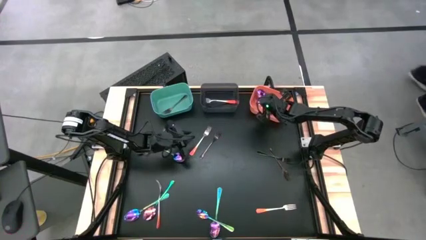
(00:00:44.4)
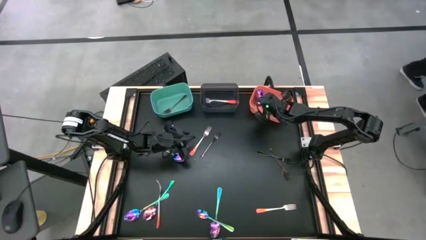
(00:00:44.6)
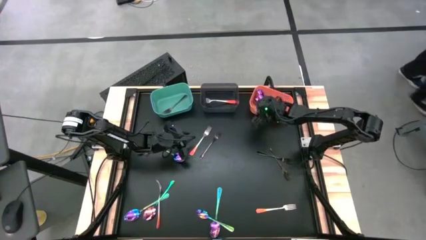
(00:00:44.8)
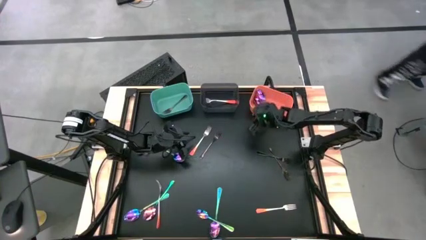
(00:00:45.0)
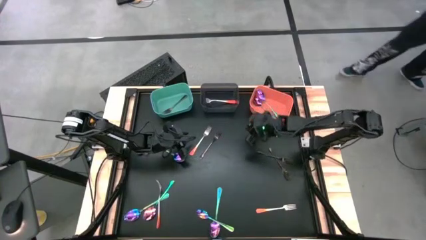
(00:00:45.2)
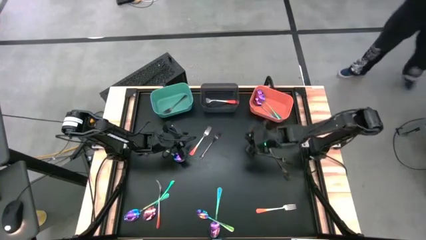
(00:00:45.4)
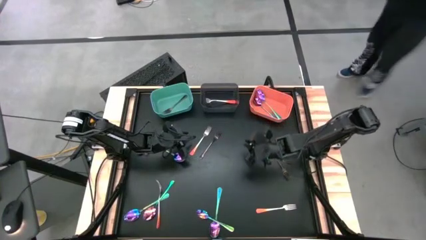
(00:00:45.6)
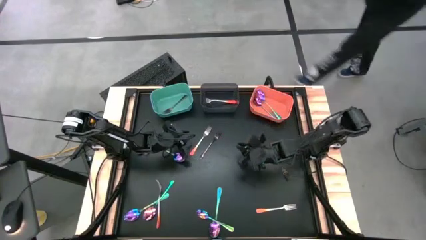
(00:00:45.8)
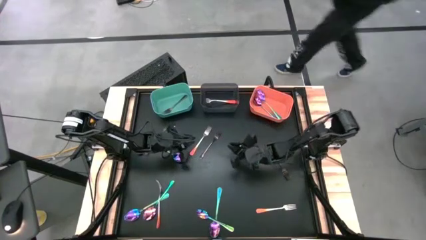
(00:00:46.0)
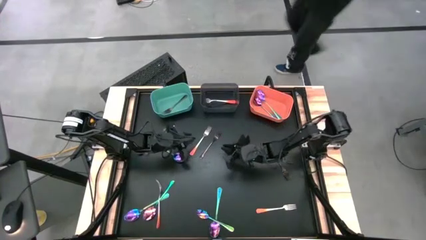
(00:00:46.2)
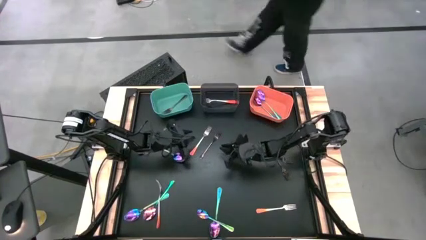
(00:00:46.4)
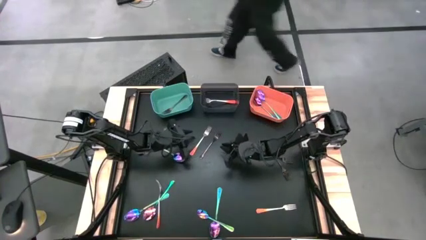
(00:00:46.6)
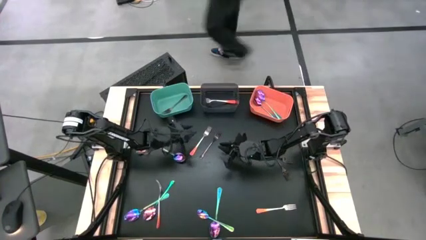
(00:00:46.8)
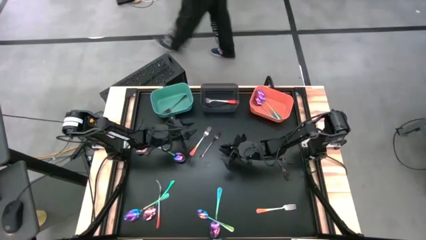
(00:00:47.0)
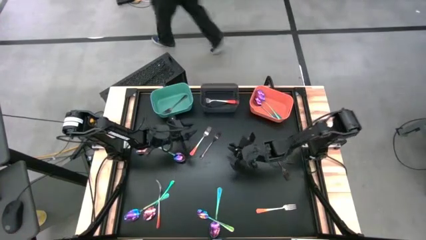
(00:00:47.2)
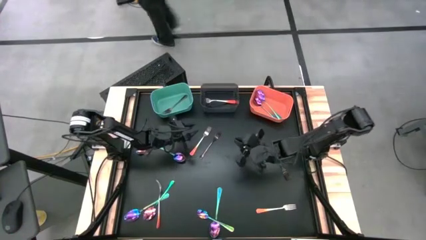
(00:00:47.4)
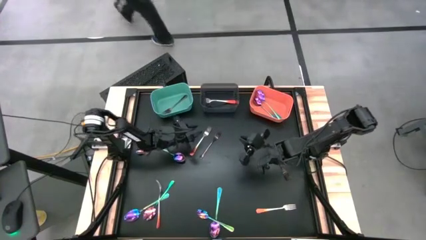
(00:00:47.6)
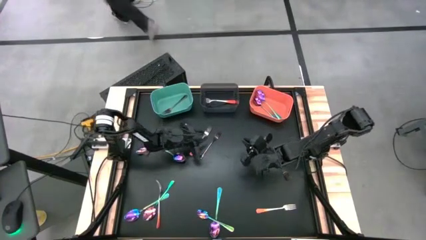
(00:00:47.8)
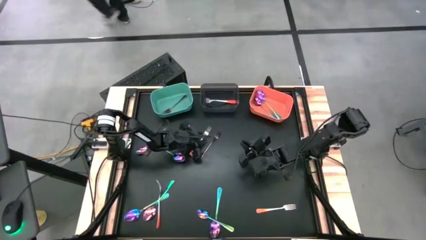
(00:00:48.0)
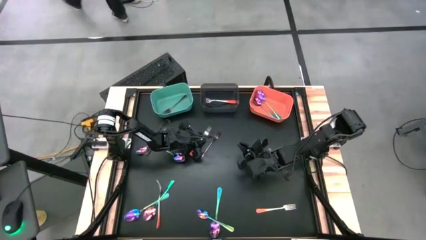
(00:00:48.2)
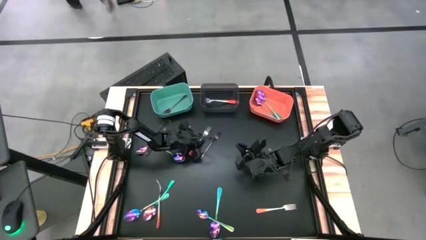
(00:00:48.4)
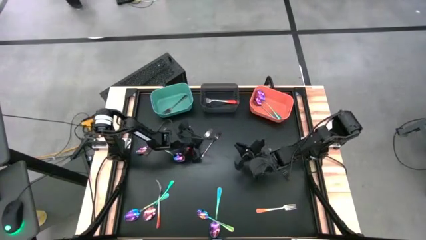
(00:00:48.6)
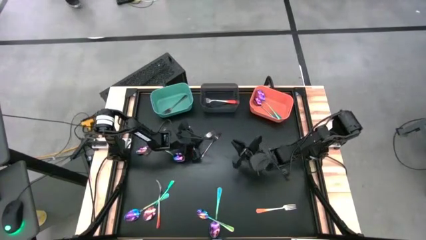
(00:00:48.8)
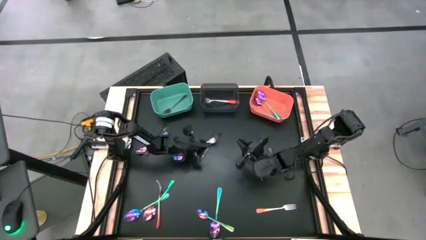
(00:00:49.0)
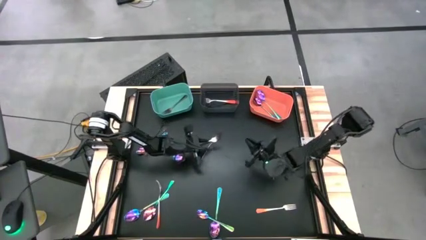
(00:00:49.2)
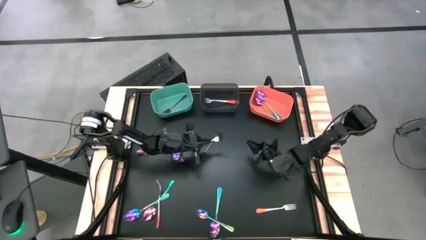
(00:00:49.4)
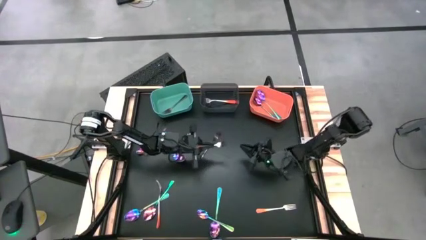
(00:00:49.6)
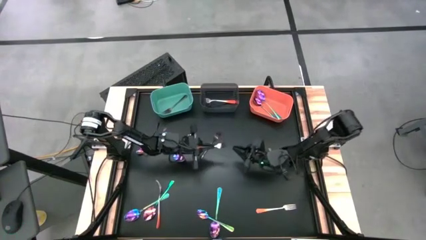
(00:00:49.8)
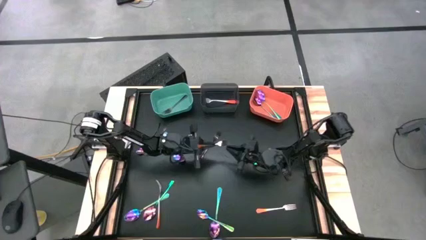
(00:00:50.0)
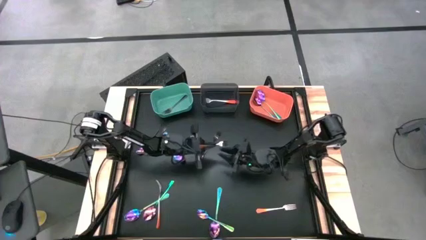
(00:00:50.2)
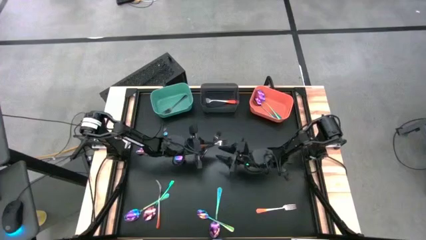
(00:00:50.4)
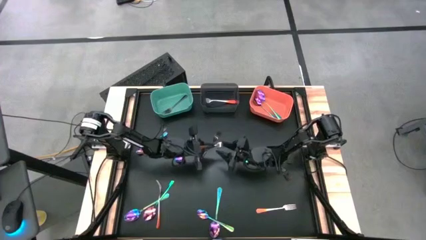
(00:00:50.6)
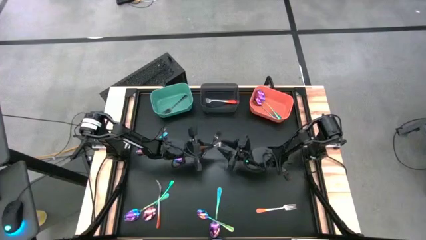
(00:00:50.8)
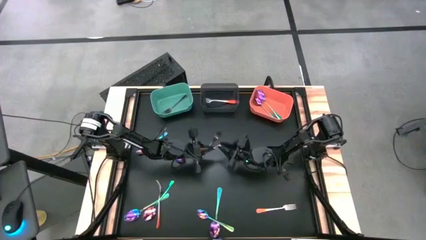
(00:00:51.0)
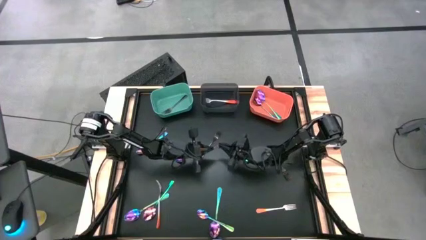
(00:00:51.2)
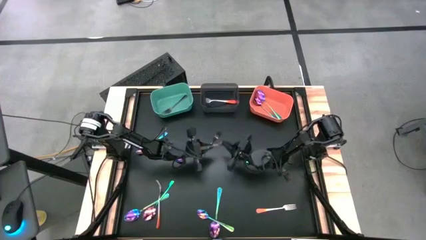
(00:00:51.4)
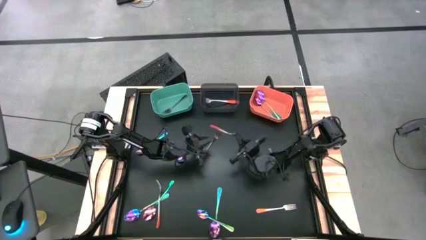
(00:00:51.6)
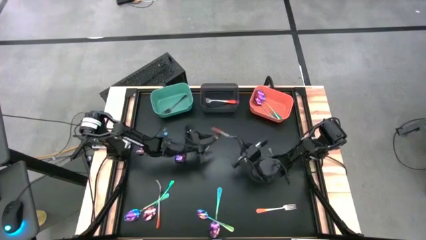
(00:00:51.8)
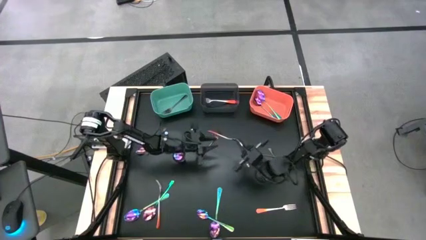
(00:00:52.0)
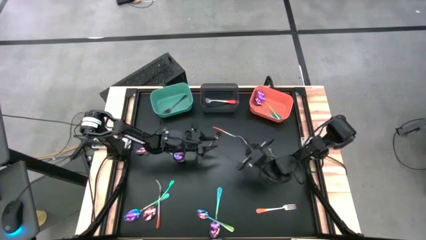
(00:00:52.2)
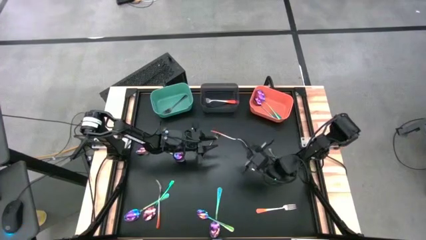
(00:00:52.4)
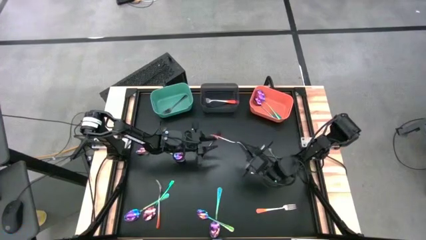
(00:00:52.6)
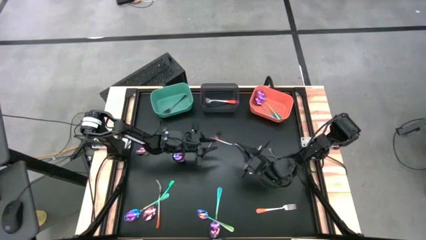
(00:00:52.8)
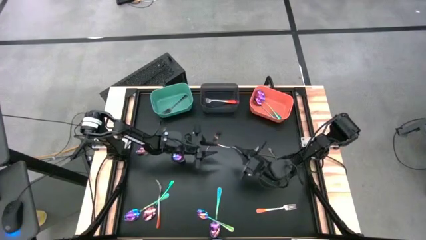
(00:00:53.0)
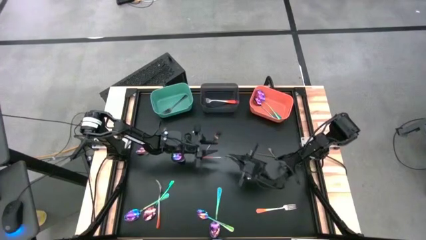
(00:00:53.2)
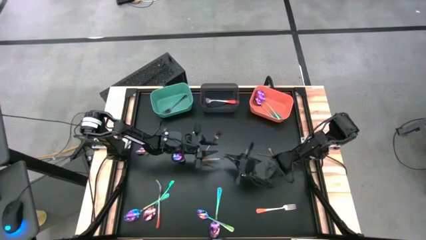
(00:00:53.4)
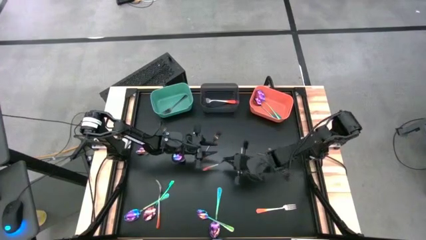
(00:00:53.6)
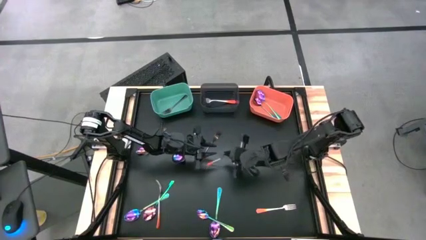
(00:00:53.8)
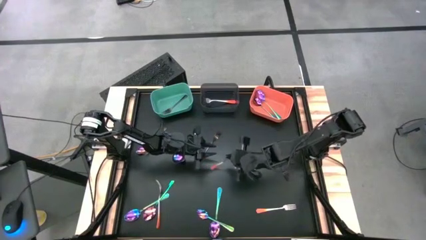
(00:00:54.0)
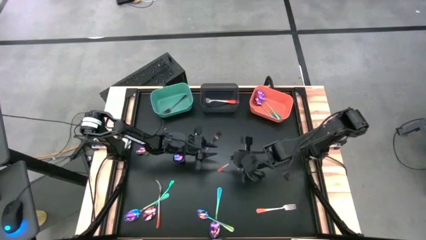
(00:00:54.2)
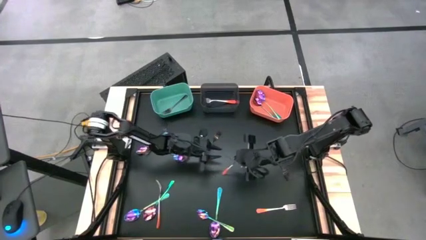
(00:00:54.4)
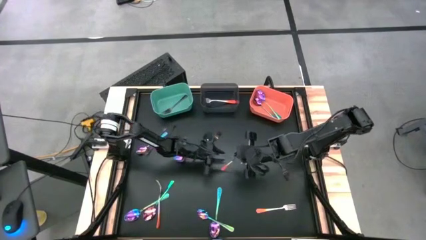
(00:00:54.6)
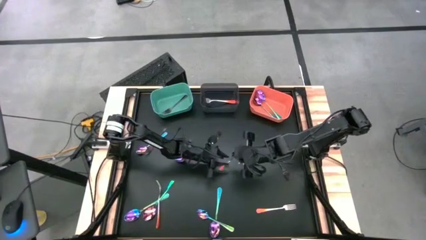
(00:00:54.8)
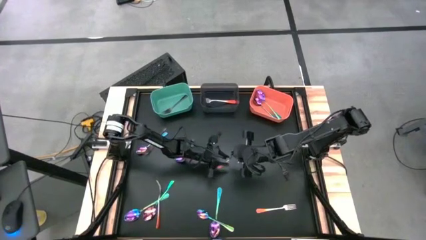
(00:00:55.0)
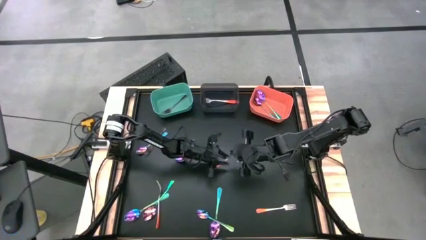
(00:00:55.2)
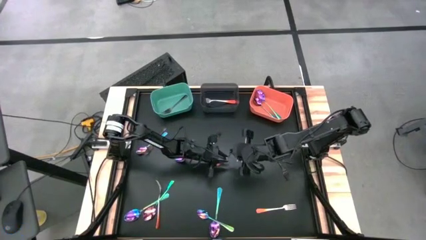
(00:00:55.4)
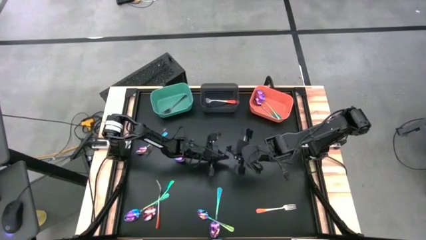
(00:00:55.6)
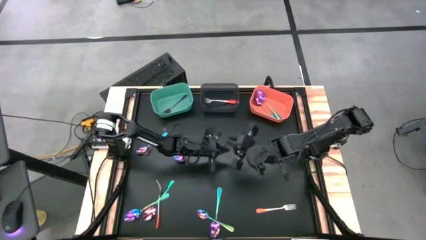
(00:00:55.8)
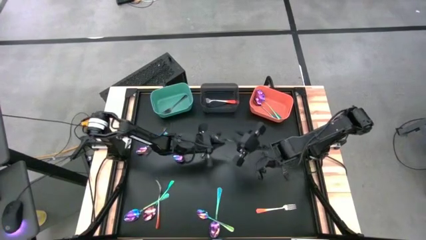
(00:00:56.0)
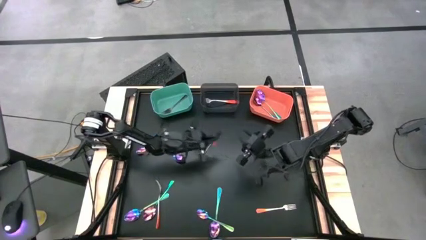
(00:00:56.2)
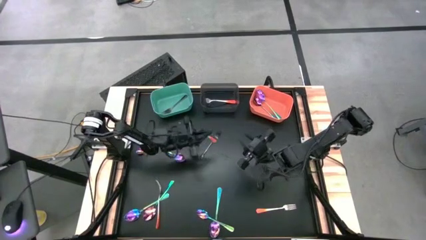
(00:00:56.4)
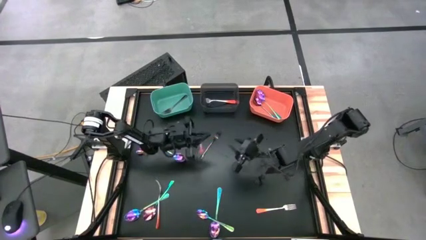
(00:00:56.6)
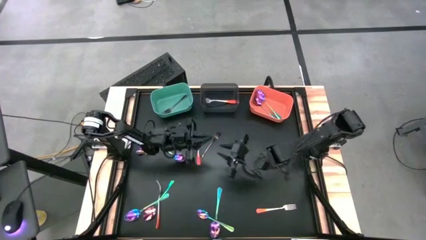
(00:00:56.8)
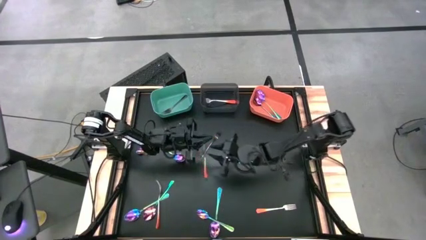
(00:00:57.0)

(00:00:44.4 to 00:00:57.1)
Task: Sort silverware by color (type)
Put the orange fork into the black bin

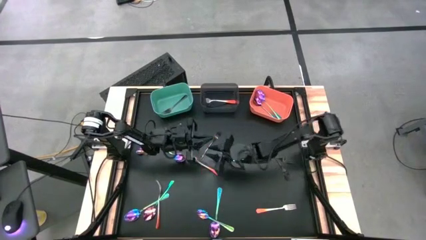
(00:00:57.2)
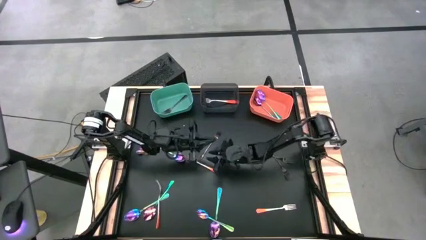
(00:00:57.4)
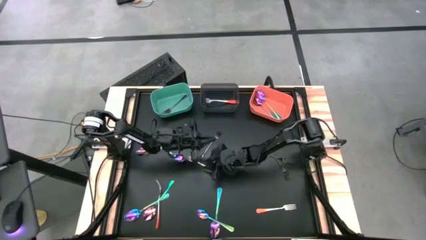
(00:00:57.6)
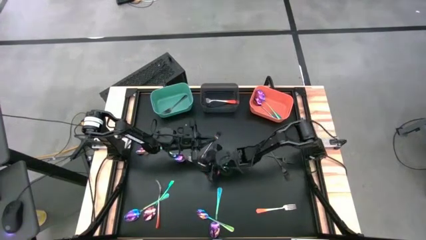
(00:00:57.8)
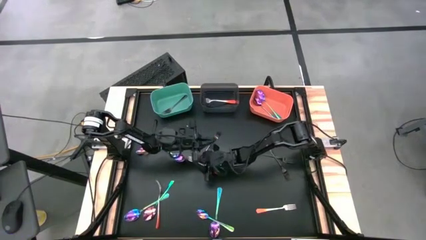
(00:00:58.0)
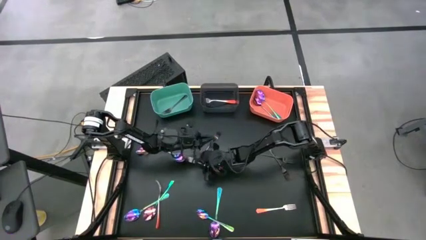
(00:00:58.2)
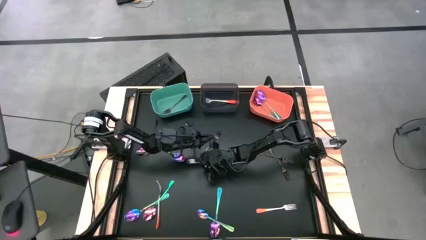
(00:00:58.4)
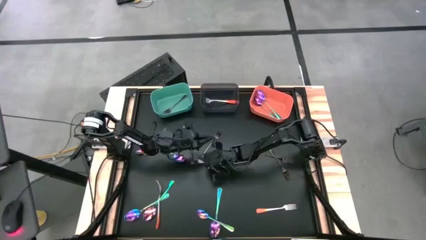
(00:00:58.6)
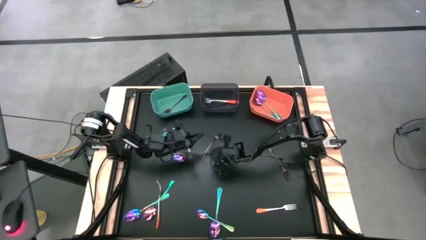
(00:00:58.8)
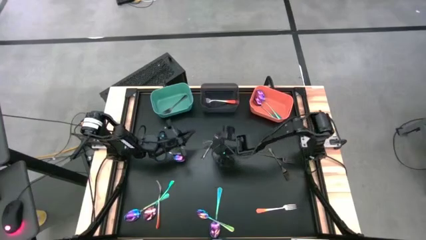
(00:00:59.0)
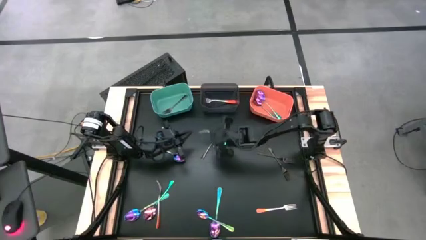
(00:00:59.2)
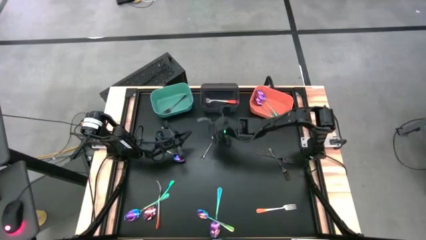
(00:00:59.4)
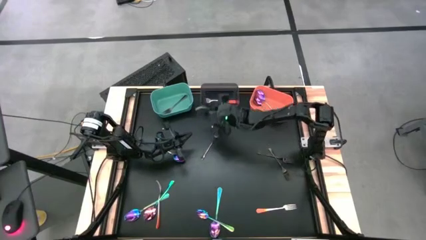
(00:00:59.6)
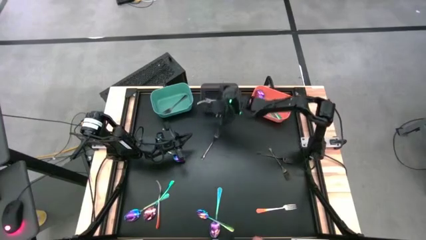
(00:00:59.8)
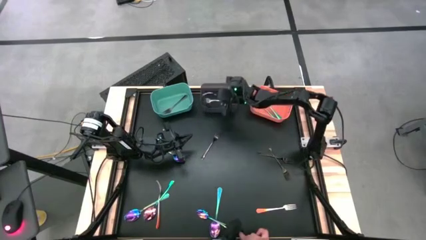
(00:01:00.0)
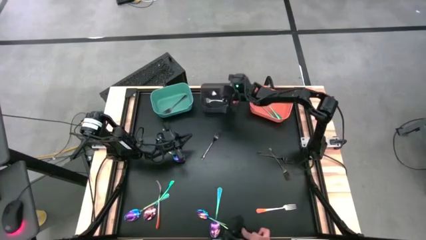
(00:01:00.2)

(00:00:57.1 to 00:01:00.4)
Put the orange fork into the black bin
